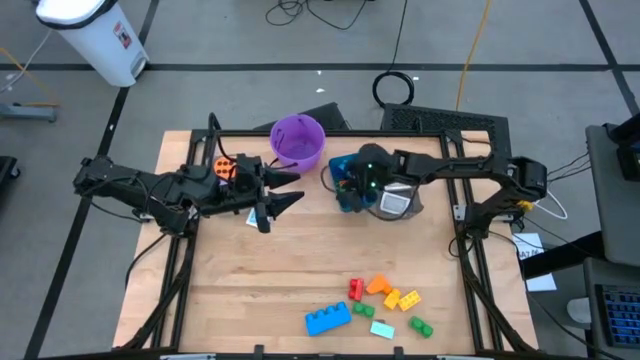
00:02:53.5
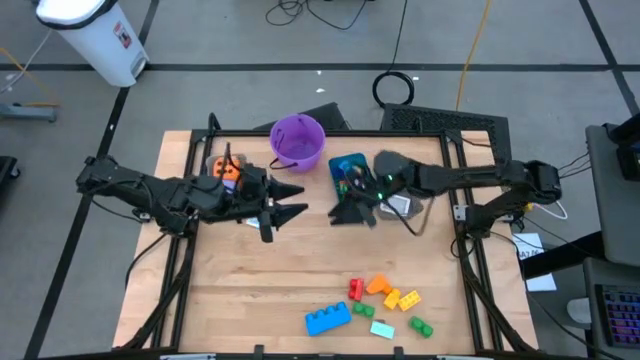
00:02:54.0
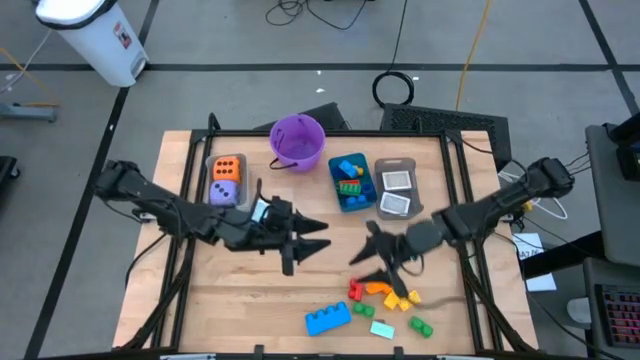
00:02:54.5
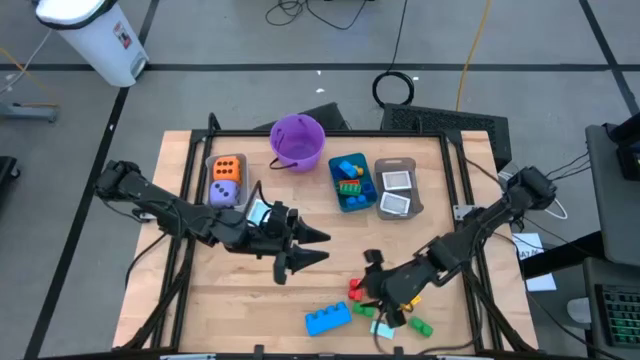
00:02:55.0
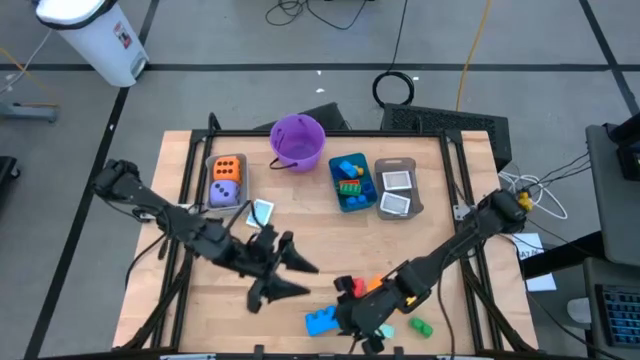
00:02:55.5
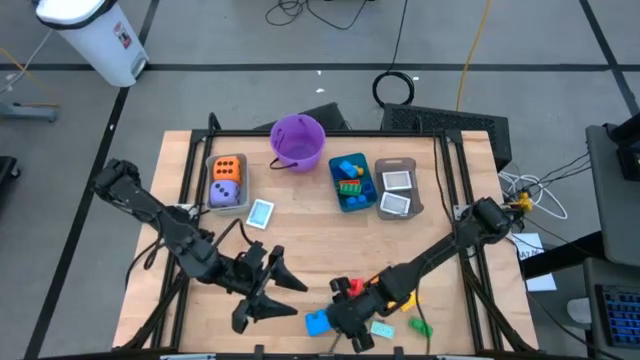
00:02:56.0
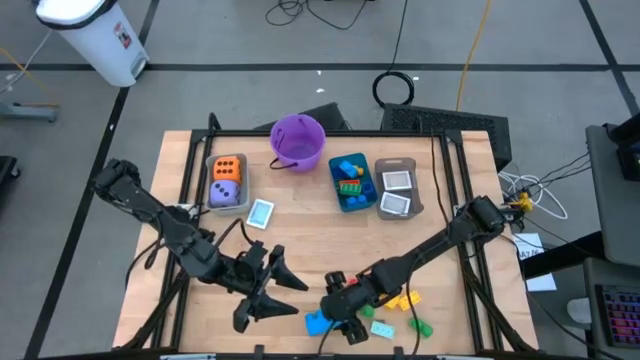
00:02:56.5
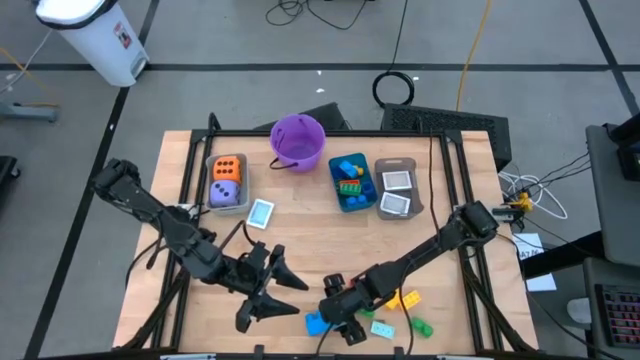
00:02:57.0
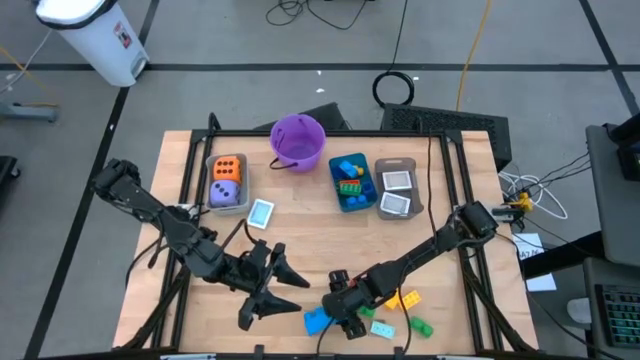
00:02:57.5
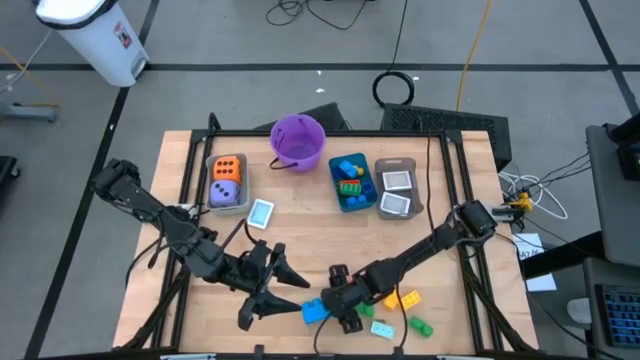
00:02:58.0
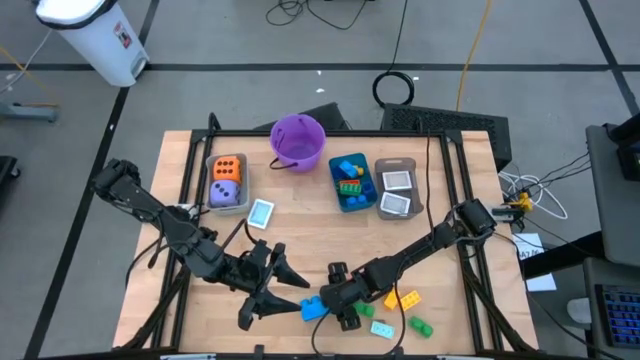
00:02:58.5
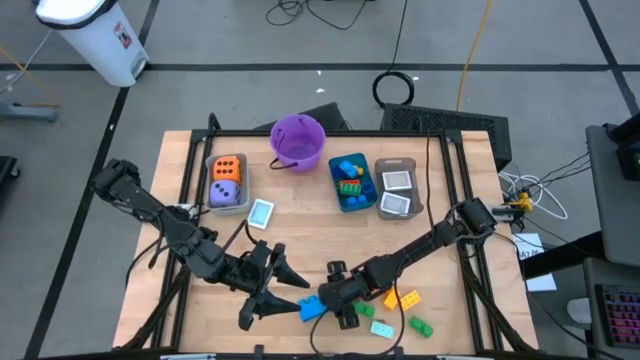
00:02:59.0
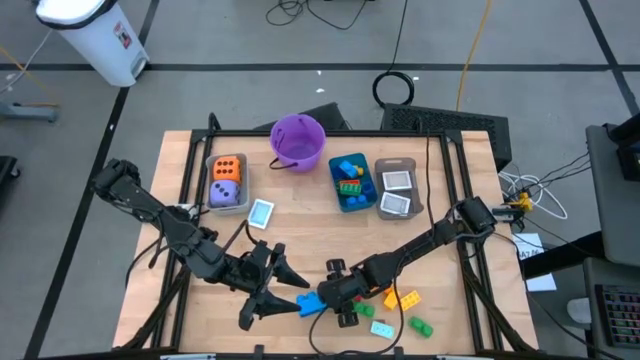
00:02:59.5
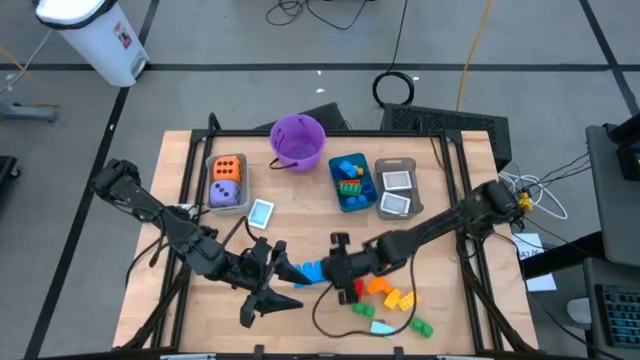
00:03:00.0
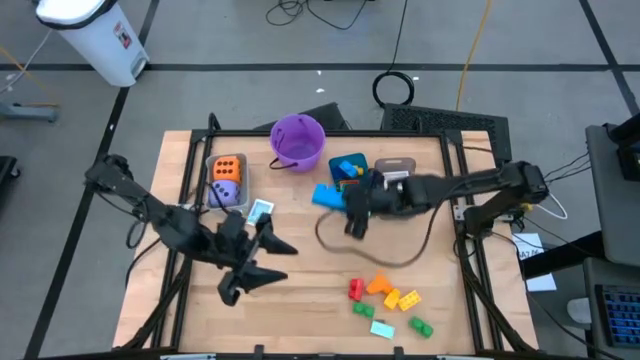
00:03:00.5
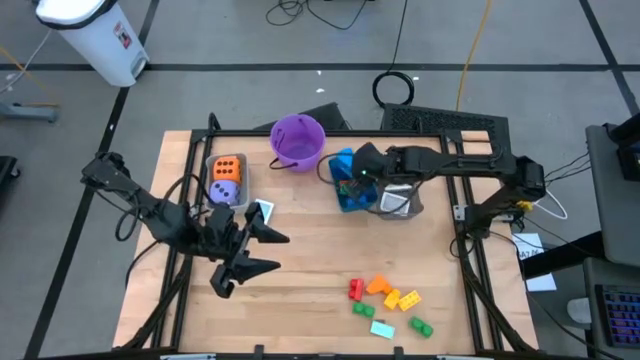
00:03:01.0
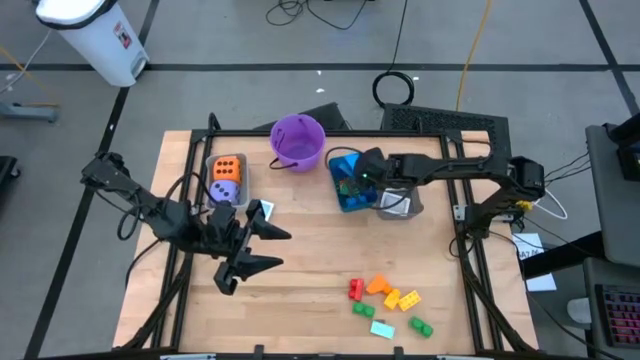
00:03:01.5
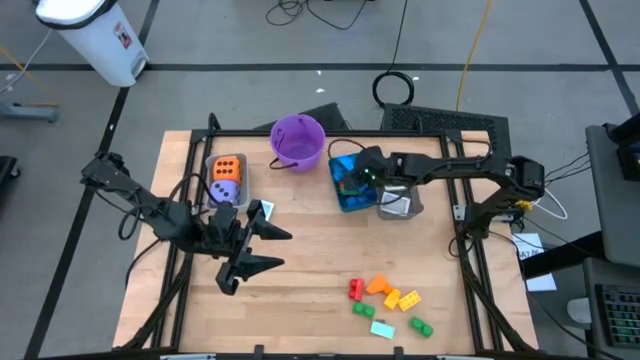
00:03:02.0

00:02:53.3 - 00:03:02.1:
Task: Pick & Place Toys
Put the blue game piece into the blue bin

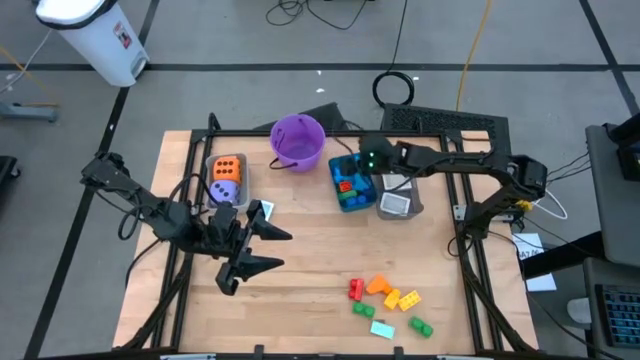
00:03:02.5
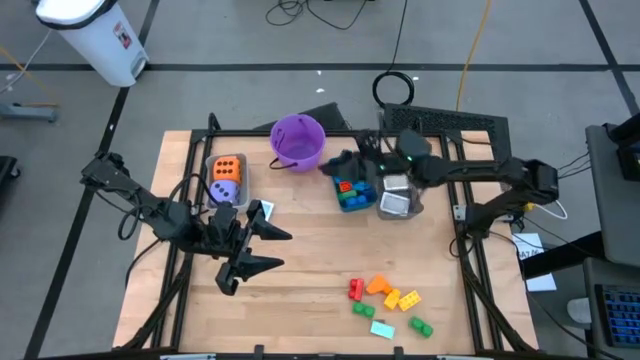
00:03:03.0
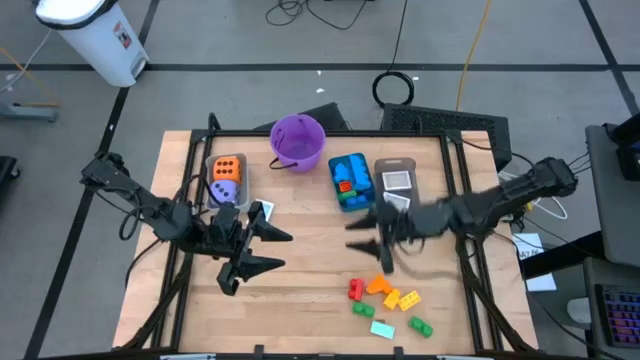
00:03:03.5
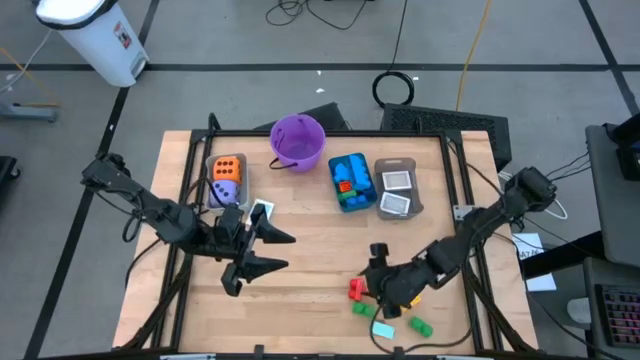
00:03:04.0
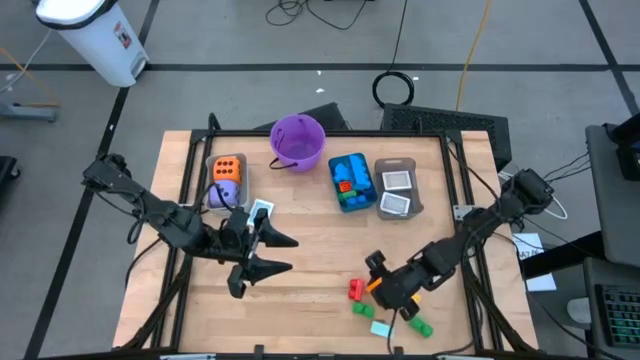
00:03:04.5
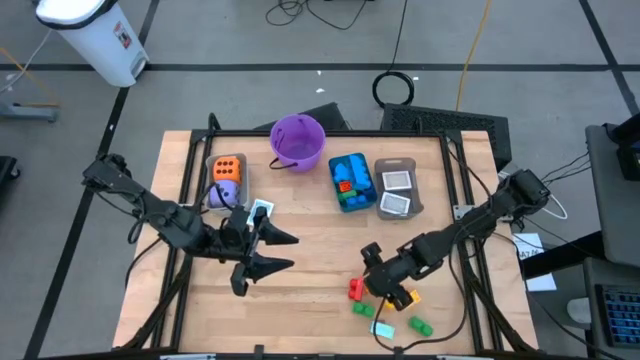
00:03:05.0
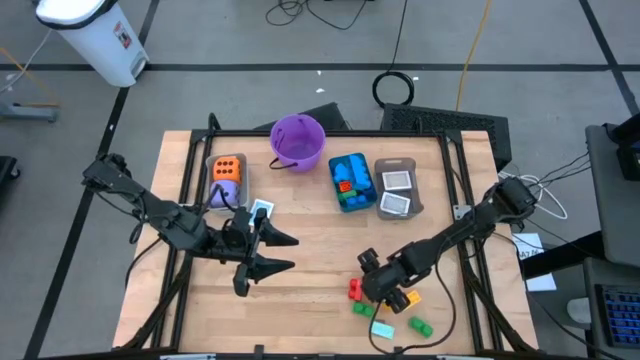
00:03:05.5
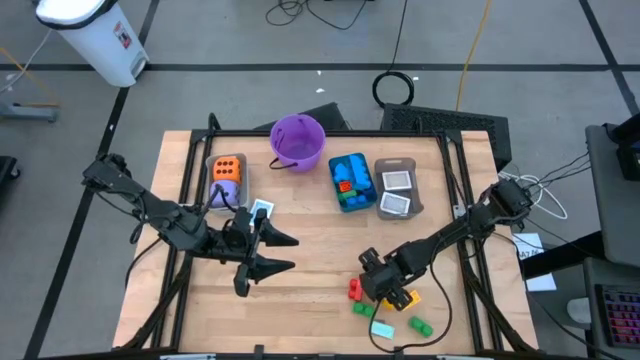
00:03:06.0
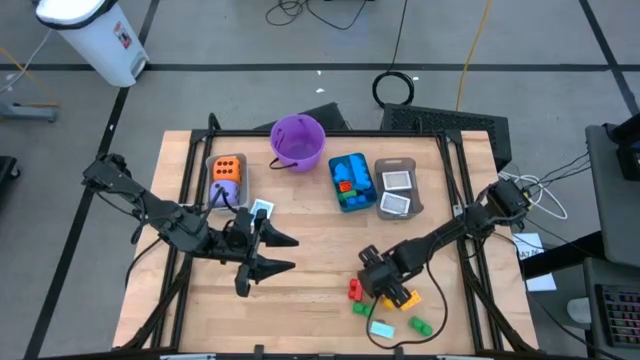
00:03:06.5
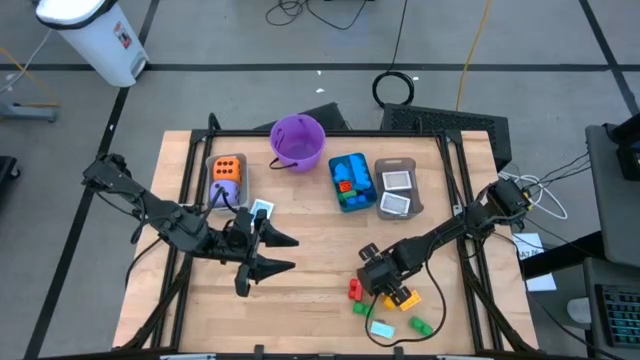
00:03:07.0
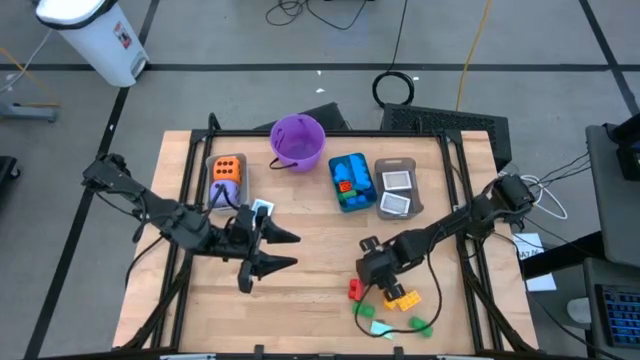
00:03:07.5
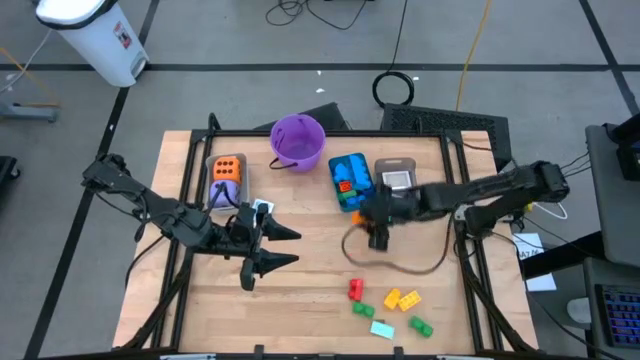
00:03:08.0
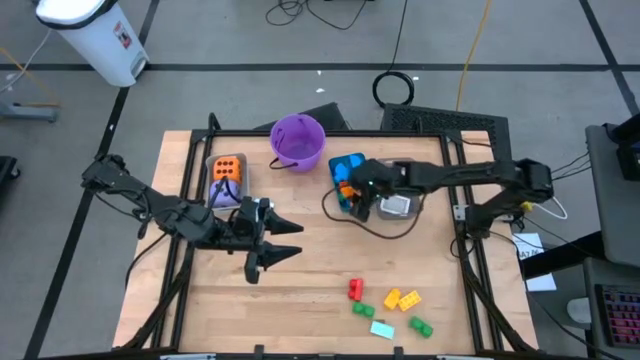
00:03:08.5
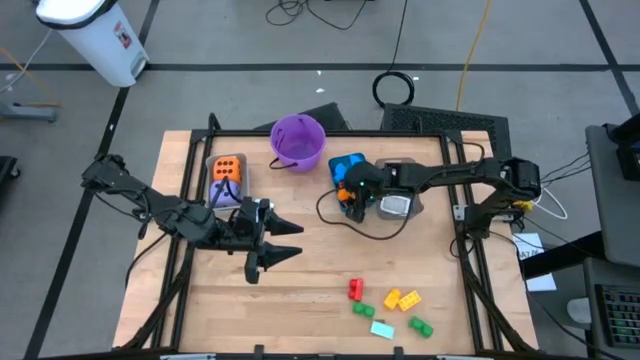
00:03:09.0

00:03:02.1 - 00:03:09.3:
Put the orange game piece into the blue bin

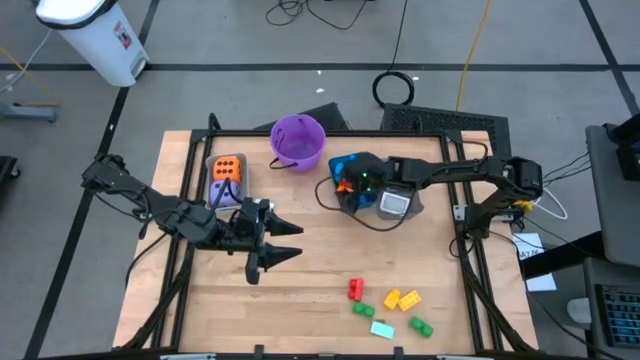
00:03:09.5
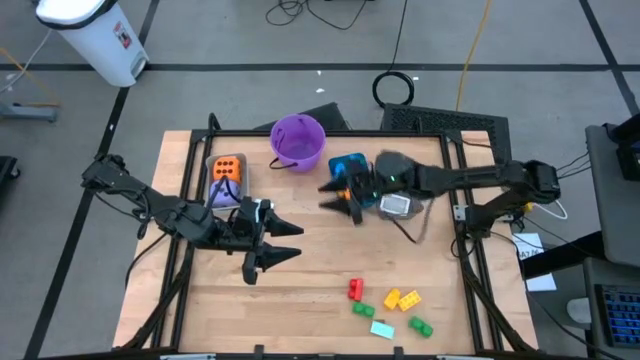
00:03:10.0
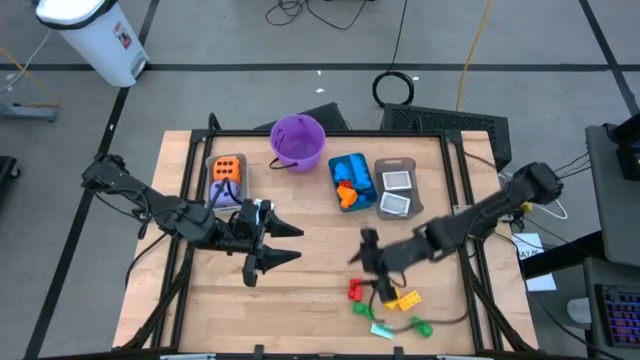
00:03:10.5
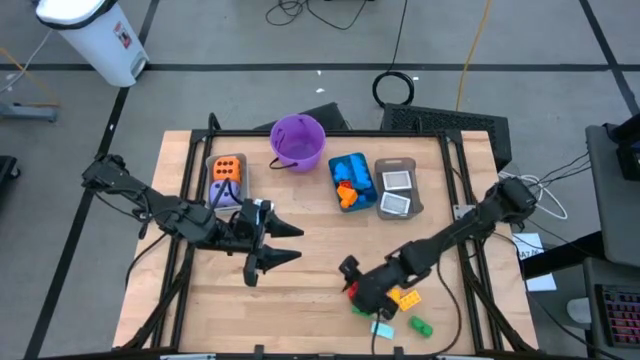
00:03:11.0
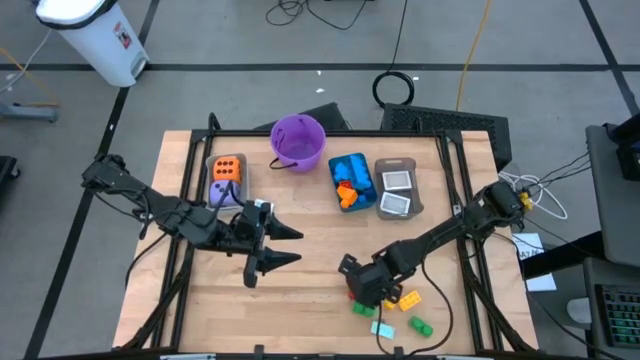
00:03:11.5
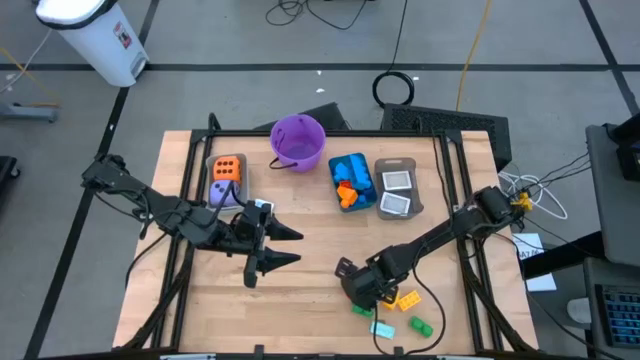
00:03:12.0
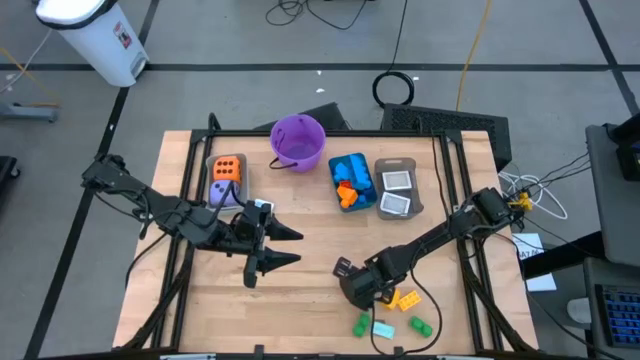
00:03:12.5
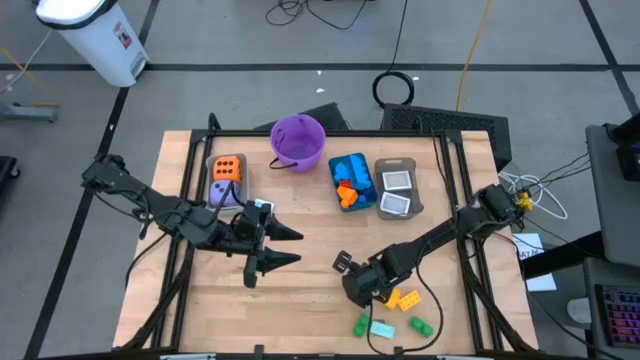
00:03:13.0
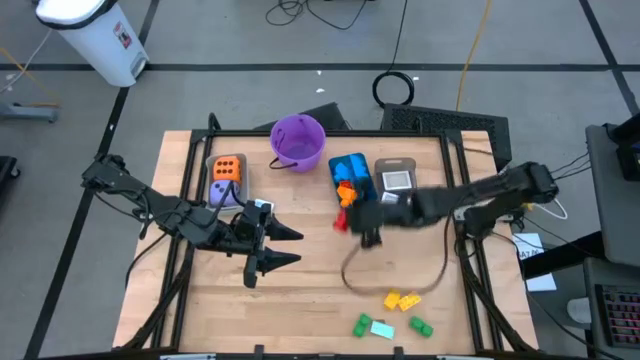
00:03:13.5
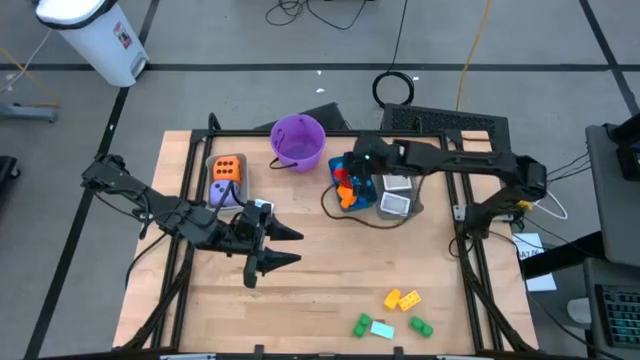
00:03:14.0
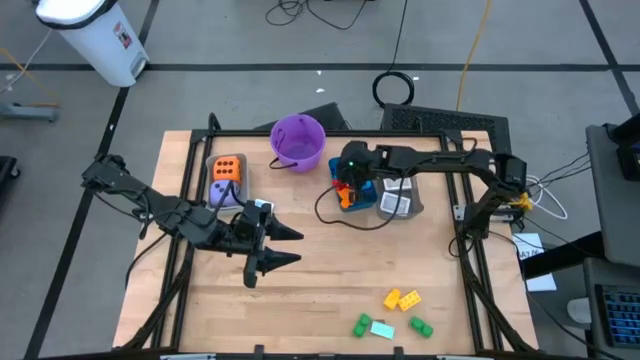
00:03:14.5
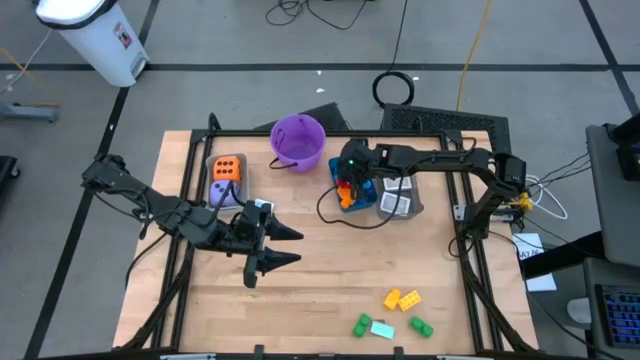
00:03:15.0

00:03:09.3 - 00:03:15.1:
Put the red game piece into the blue bin
